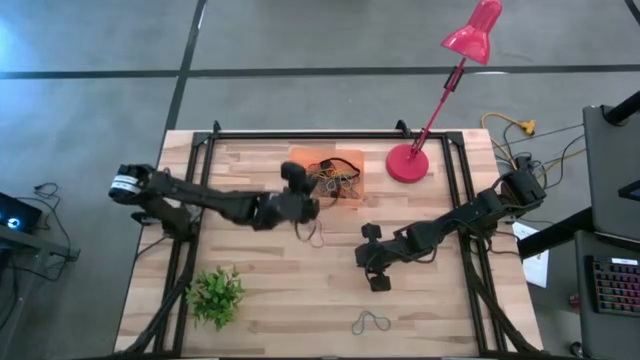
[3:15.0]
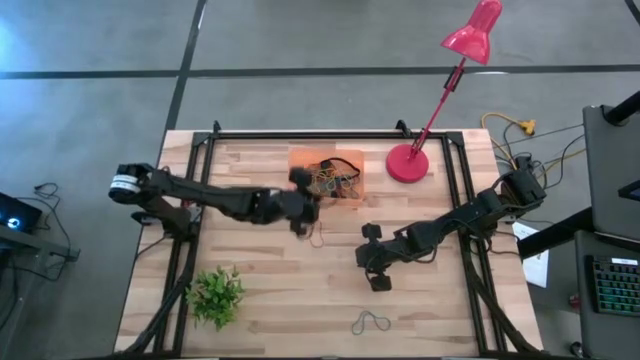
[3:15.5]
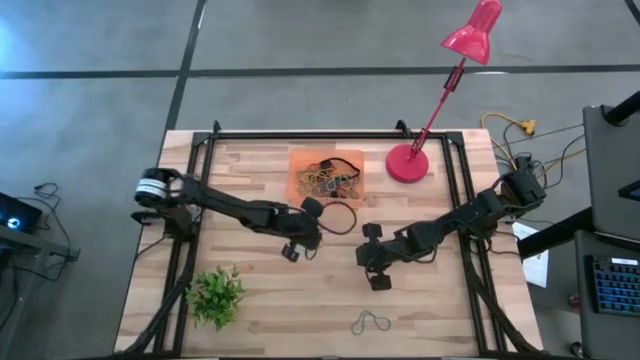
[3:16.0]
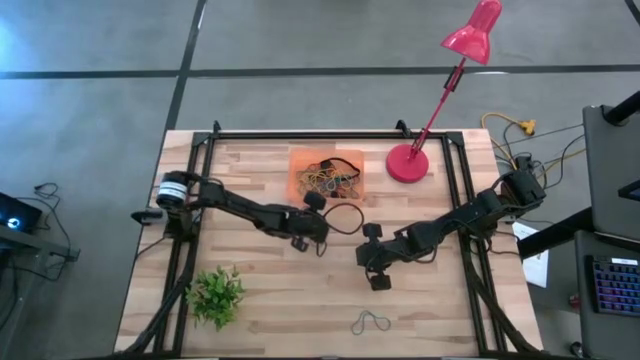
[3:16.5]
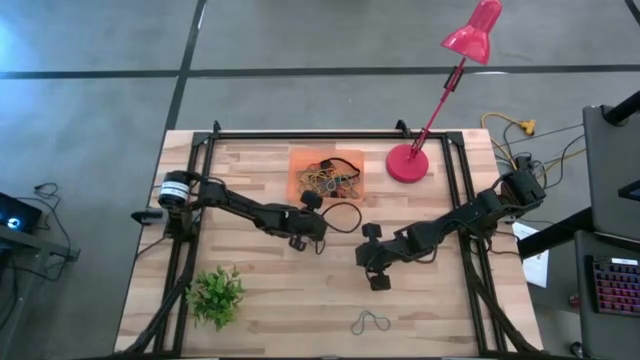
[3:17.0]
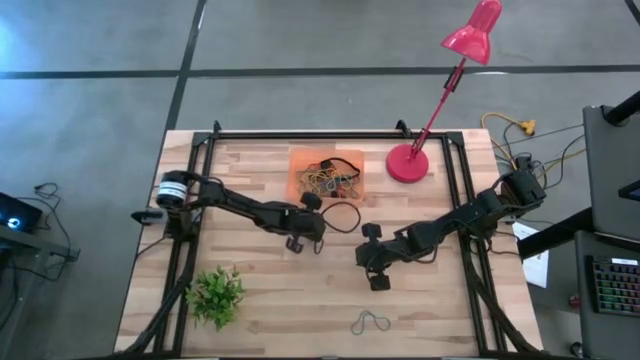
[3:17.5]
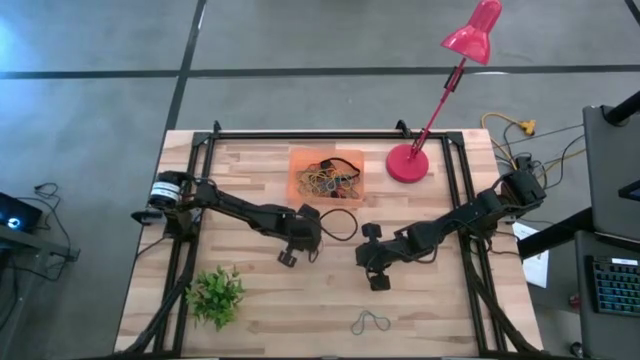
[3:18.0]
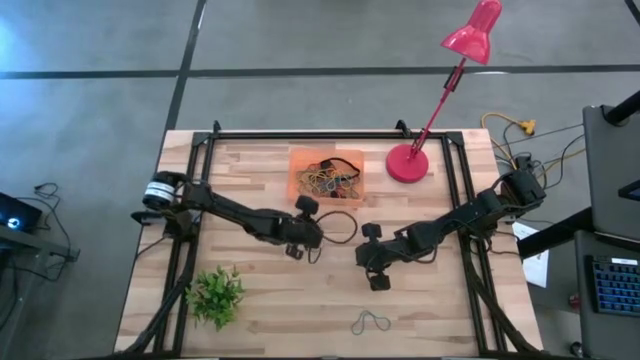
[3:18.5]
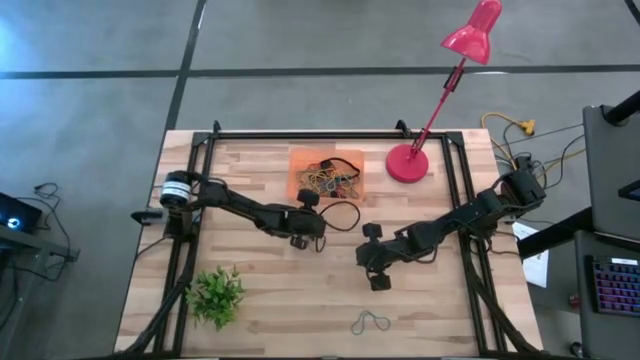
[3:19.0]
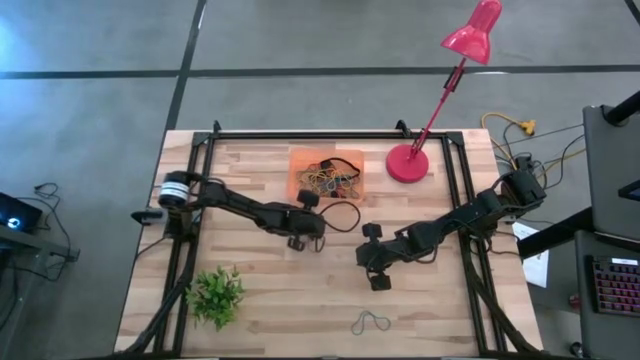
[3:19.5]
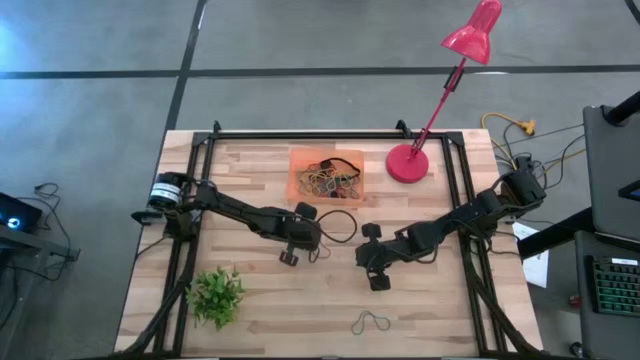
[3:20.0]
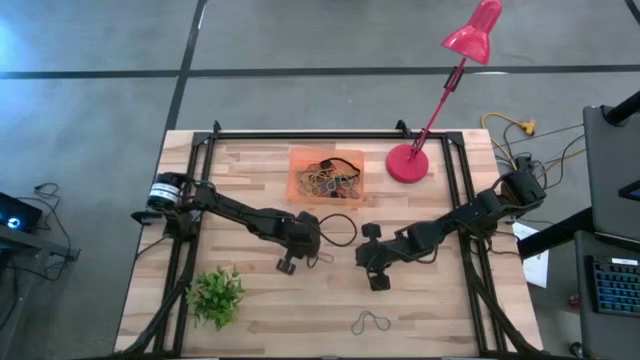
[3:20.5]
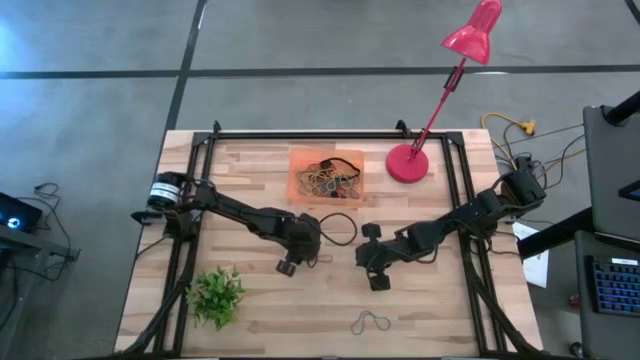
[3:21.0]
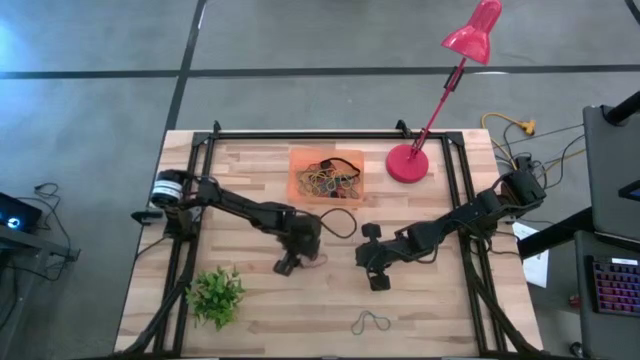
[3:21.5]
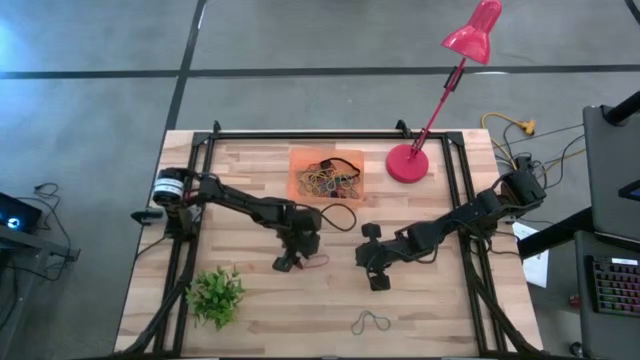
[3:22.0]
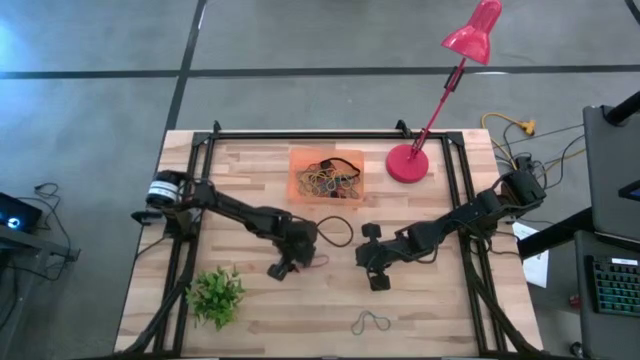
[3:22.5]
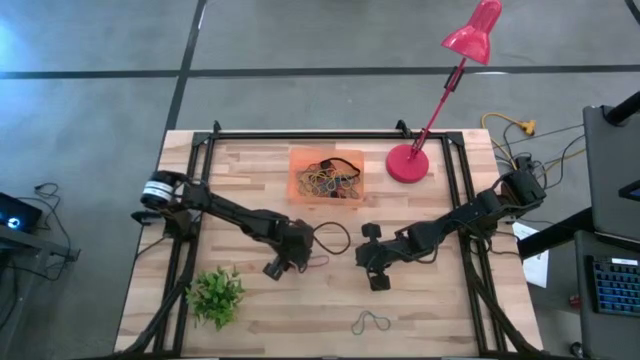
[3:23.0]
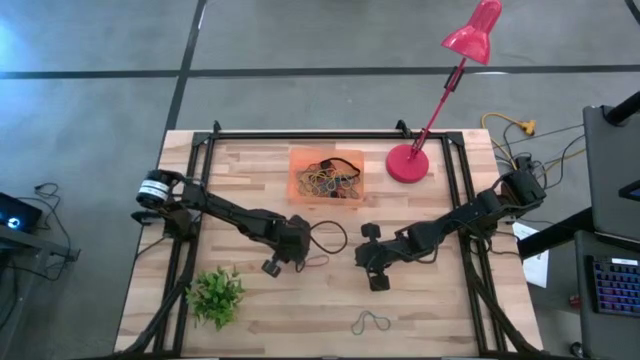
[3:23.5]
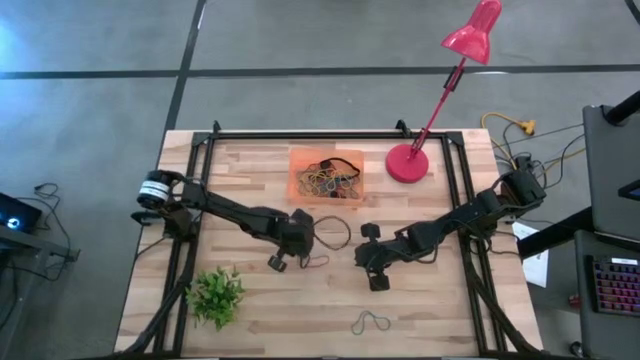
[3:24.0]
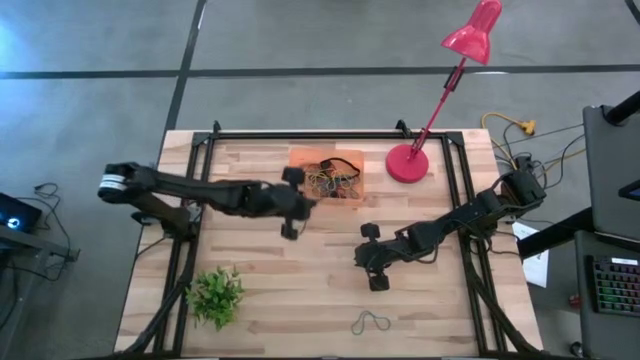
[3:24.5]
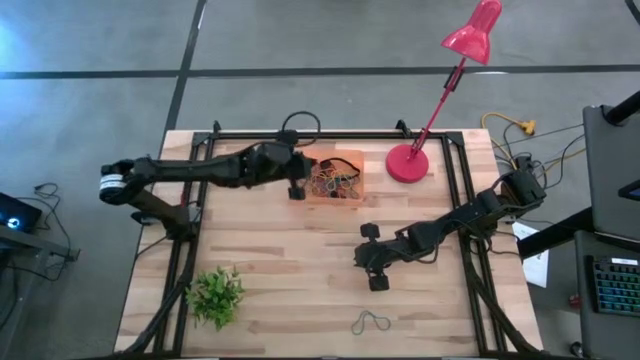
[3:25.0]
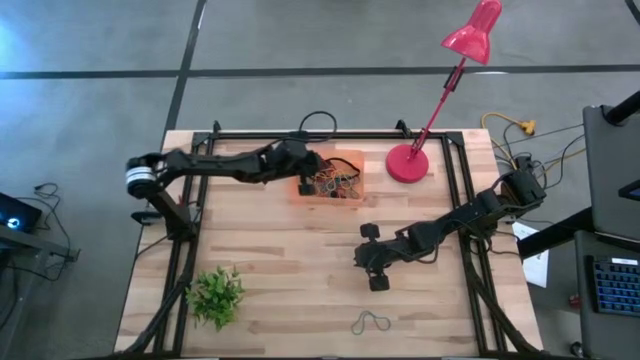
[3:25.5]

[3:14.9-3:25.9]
Task: Pick and place rubber bands into bin
Put the red rubber band into the orange bin

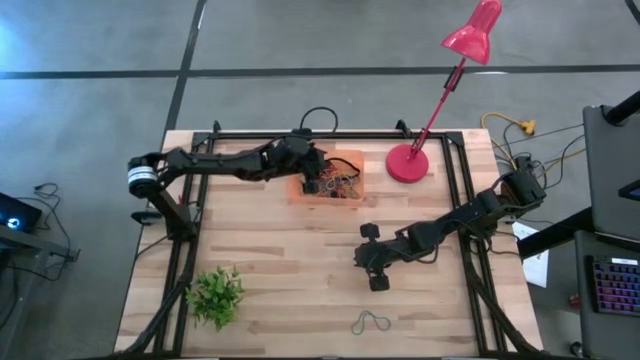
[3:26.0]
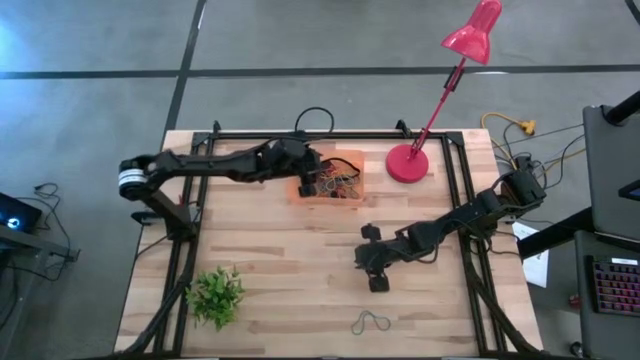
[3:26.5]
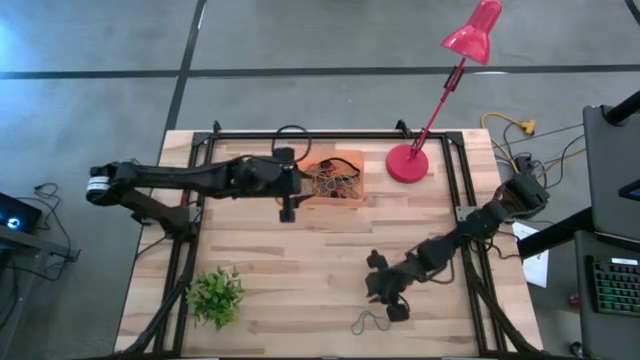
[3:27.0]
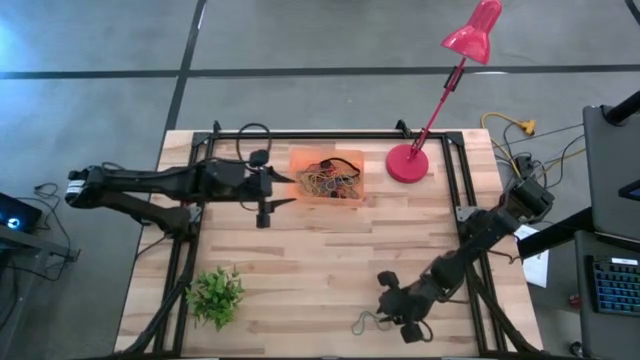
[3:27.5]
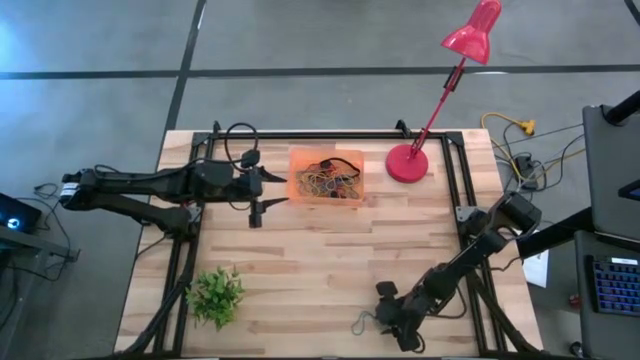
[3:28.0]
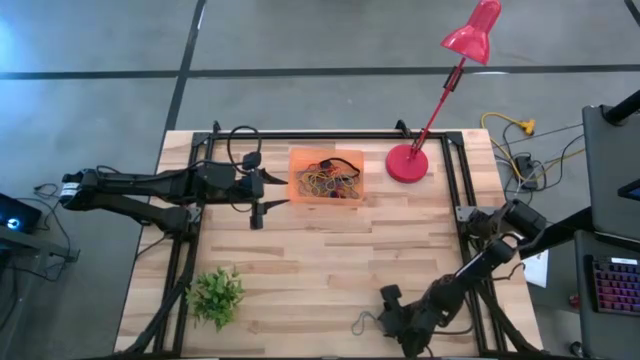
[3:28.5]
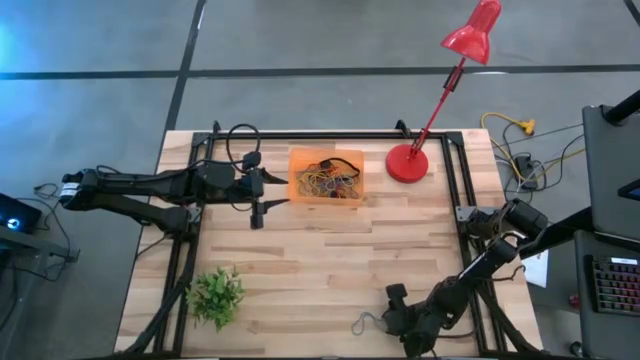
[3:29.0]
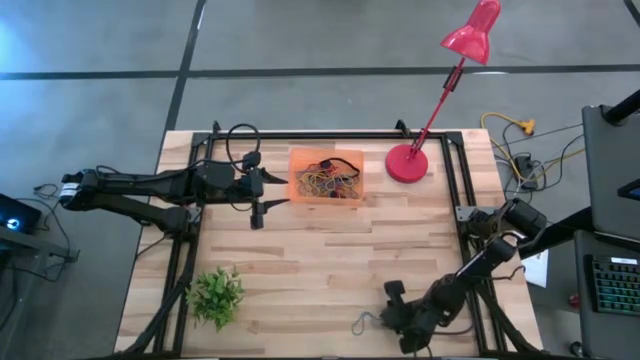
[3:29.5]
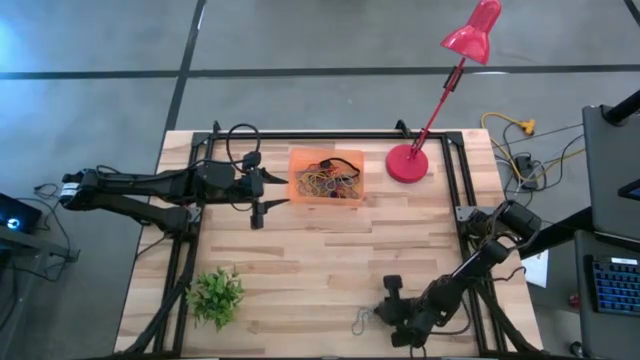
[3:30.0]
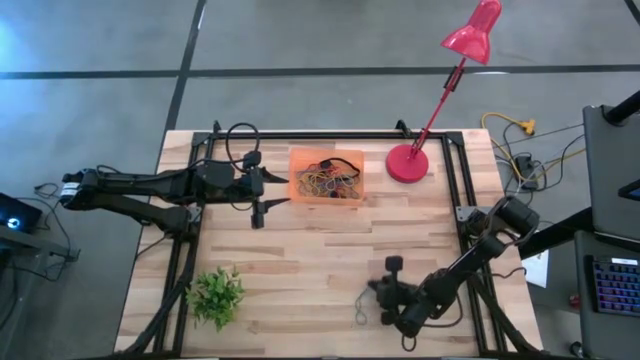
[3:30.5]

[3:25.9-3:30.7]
Put the blue rubber band into the orange bin

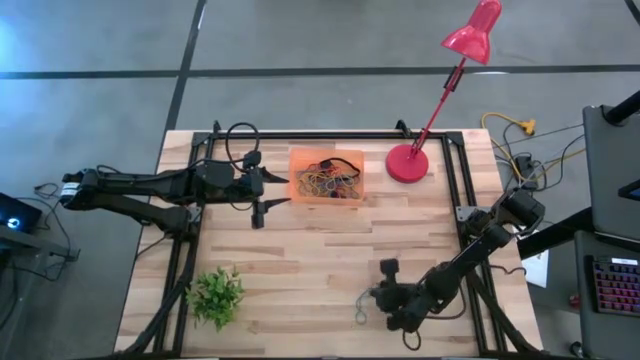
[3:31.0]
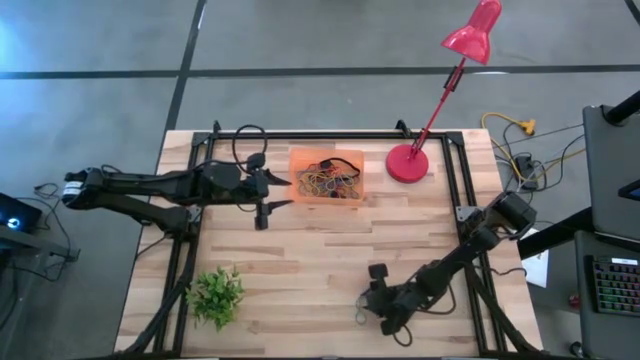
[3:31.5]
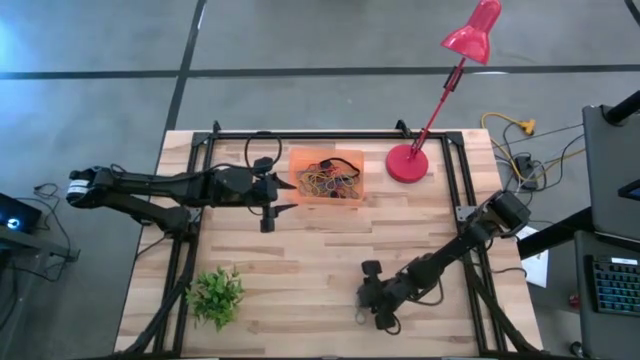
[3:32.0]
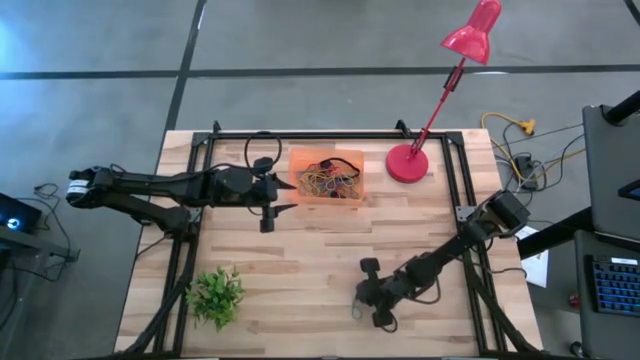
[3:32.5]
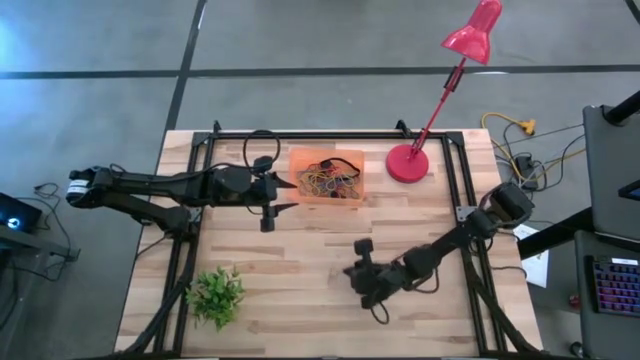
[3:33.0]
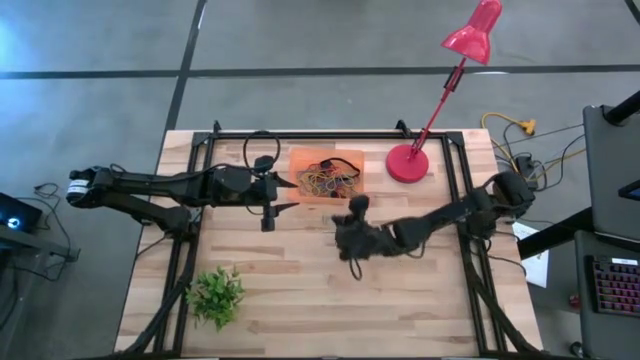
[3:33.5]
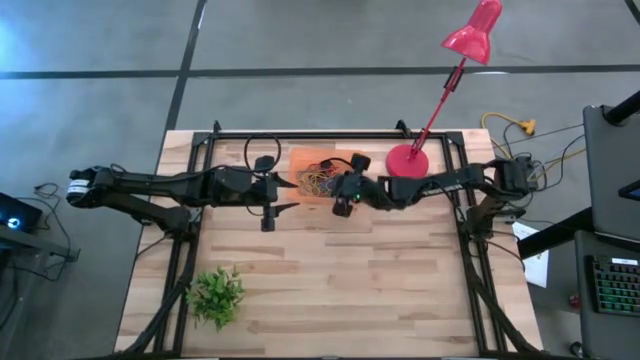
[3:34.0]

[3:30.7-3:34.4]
Put the blue rubber band into the orange bin

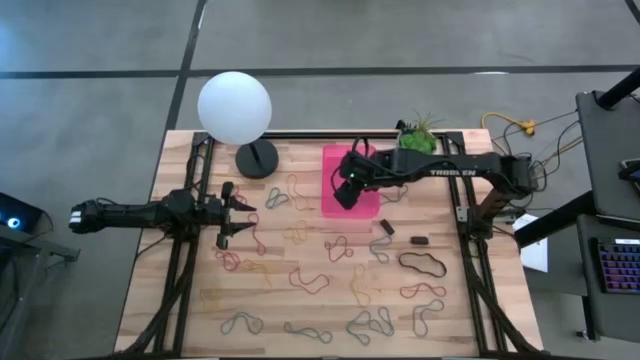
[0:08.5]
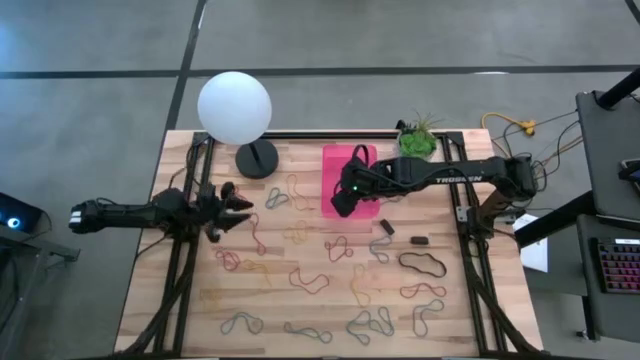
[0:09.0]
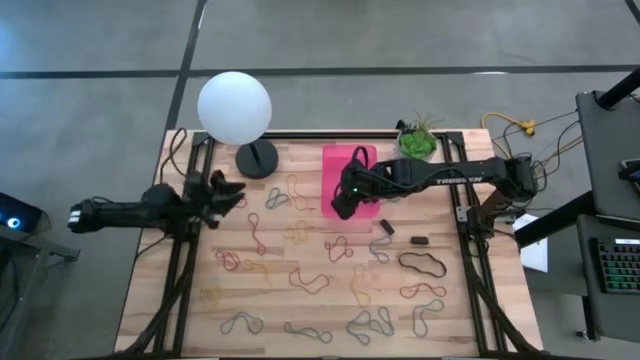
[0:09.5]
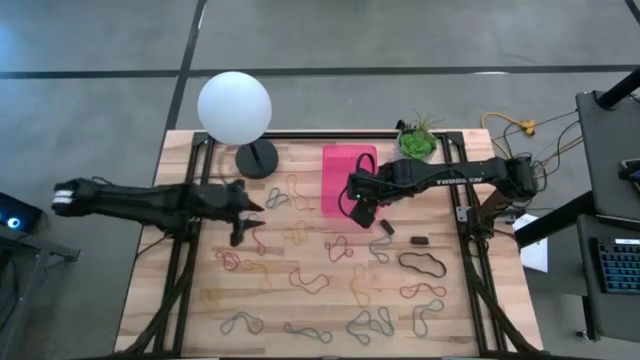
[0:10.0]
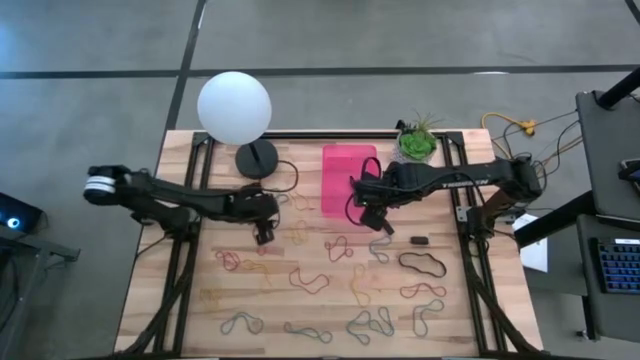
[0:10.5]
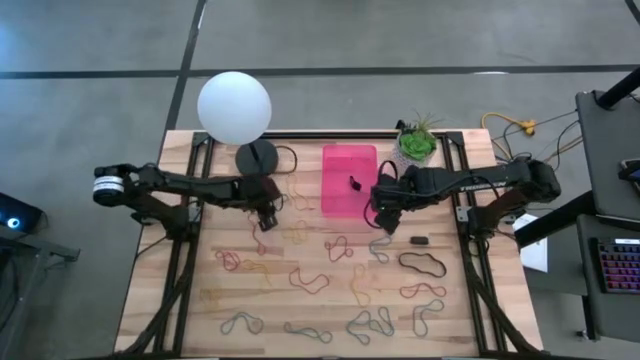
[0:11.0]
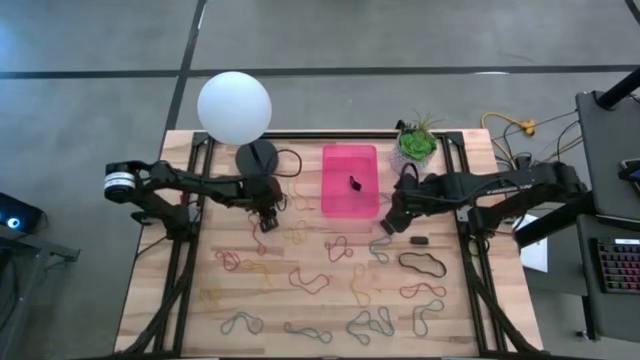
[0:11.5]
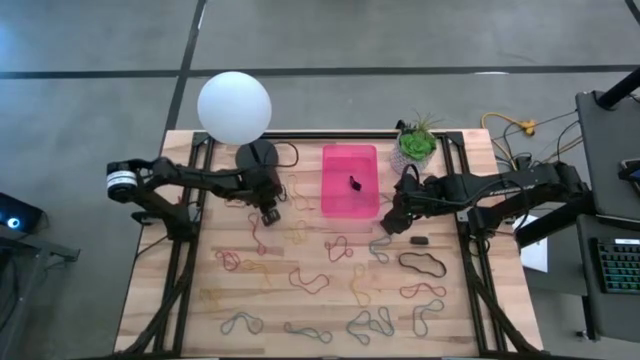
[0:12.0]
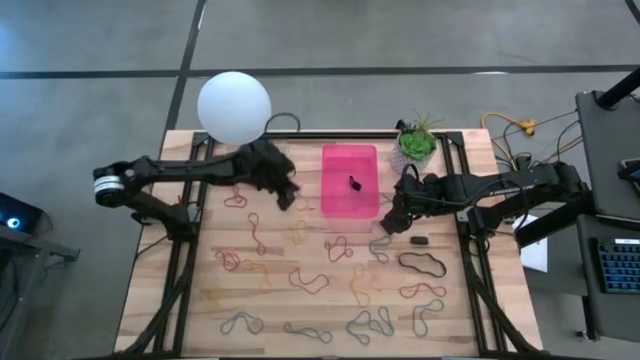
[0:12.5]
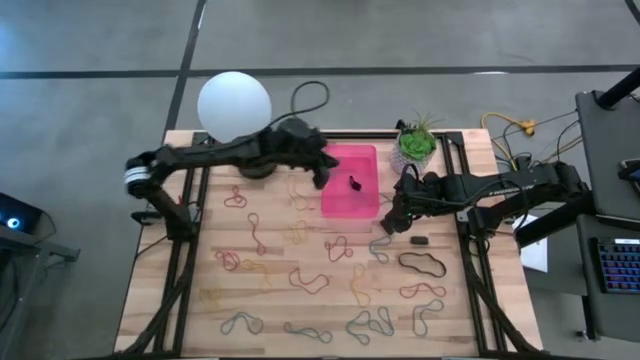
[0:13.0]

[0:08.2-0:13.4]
Task: Pick and place rubber bands into bin
Put the blue rubber band into the pink bin
